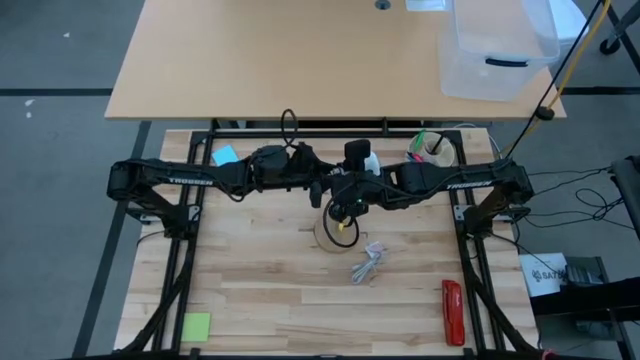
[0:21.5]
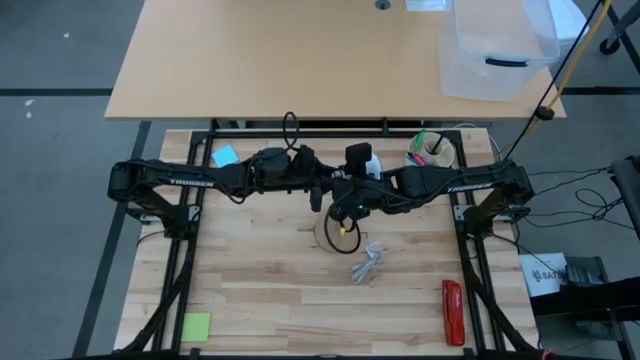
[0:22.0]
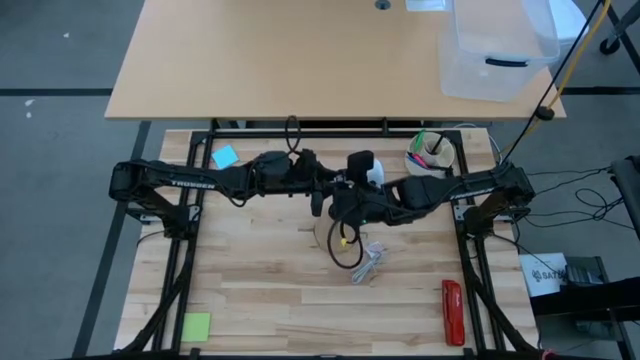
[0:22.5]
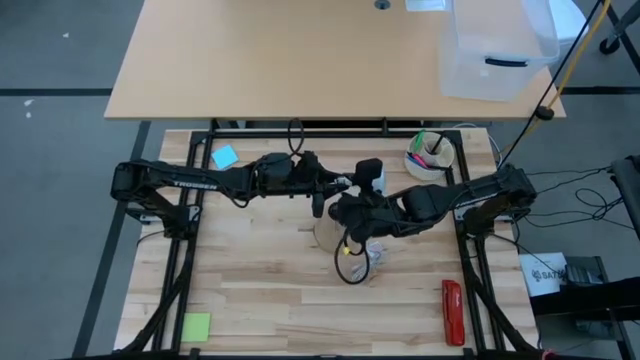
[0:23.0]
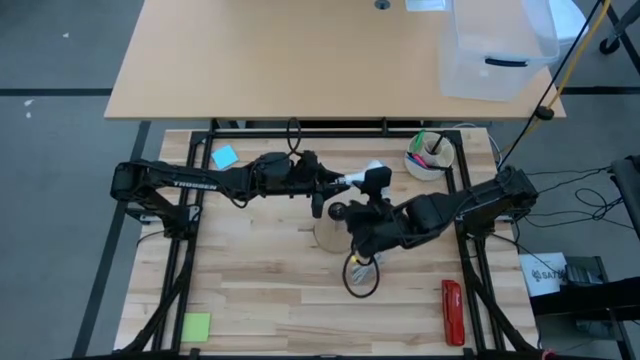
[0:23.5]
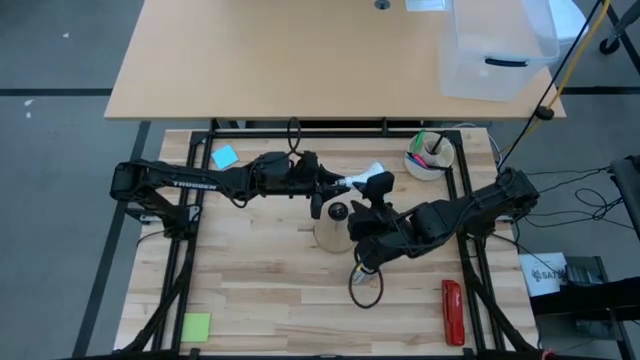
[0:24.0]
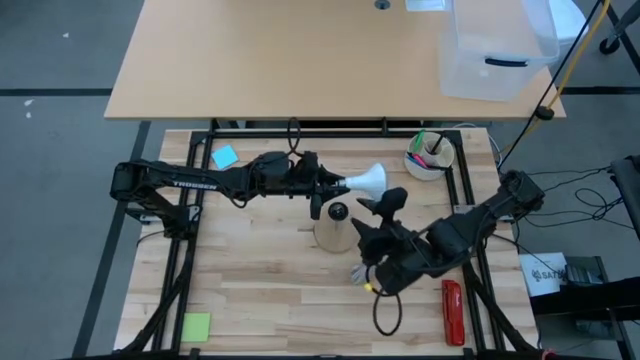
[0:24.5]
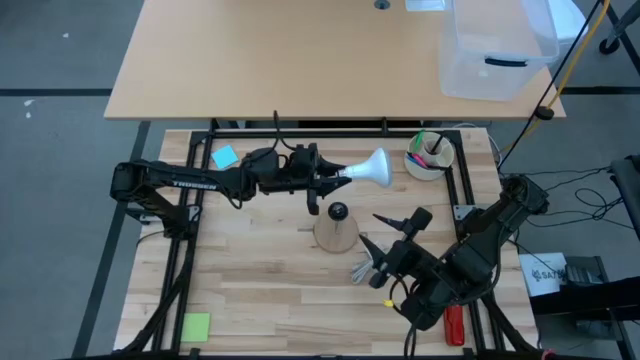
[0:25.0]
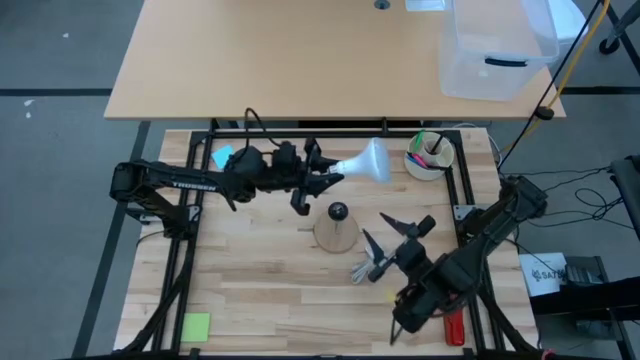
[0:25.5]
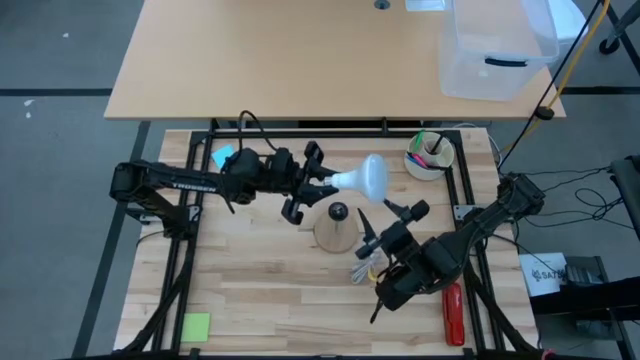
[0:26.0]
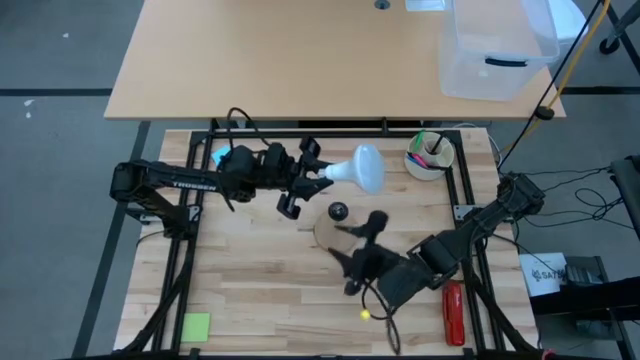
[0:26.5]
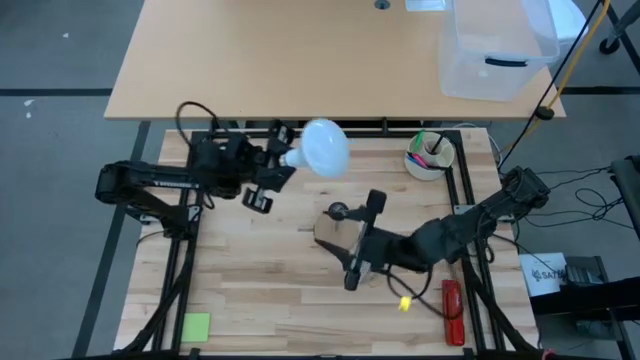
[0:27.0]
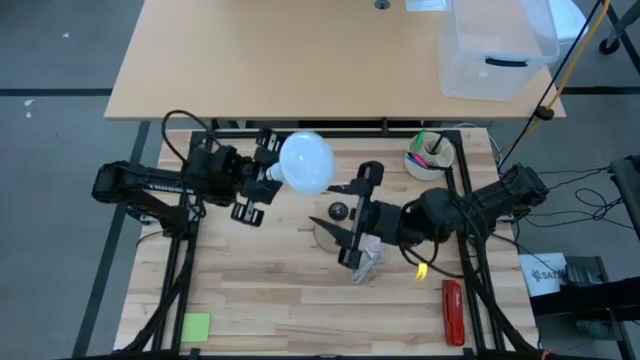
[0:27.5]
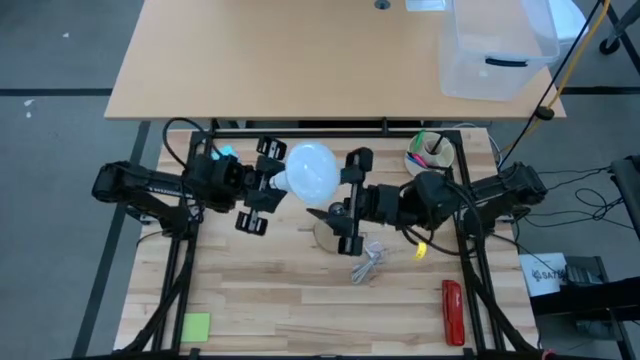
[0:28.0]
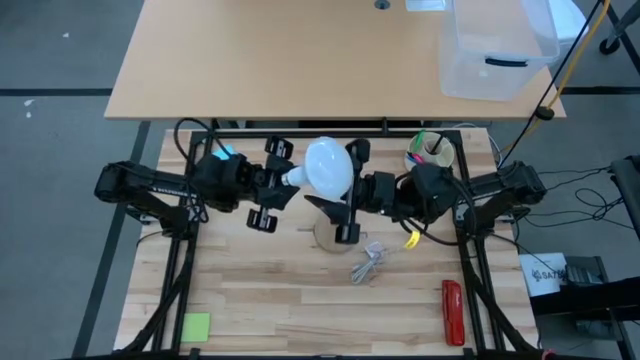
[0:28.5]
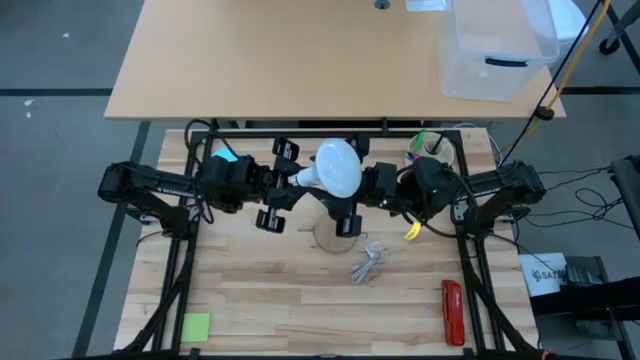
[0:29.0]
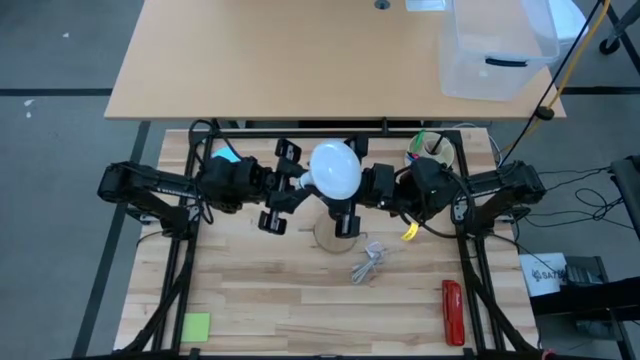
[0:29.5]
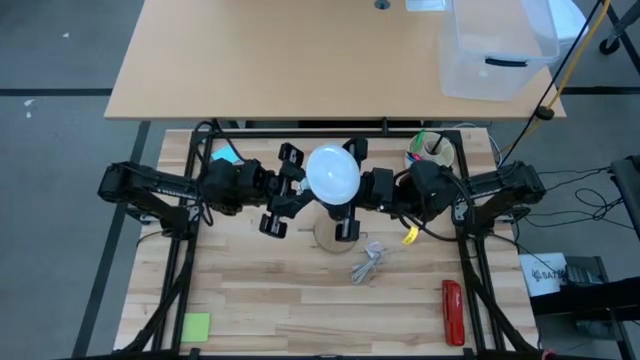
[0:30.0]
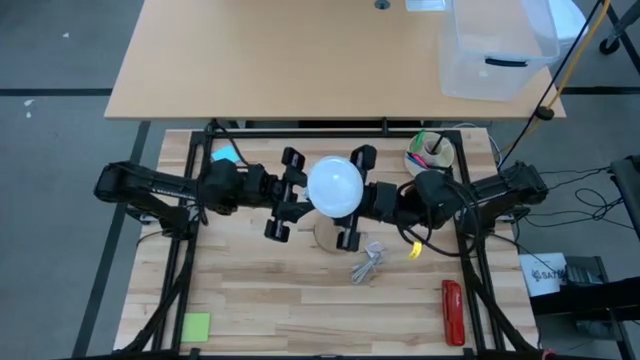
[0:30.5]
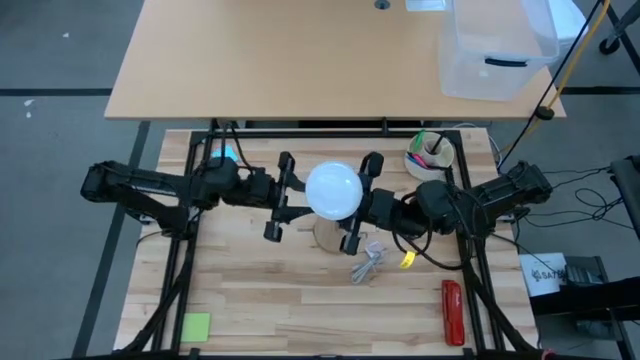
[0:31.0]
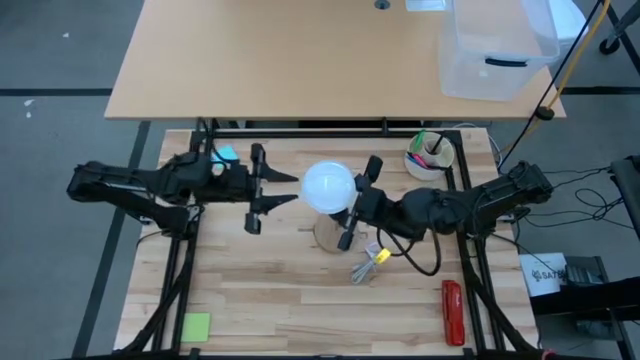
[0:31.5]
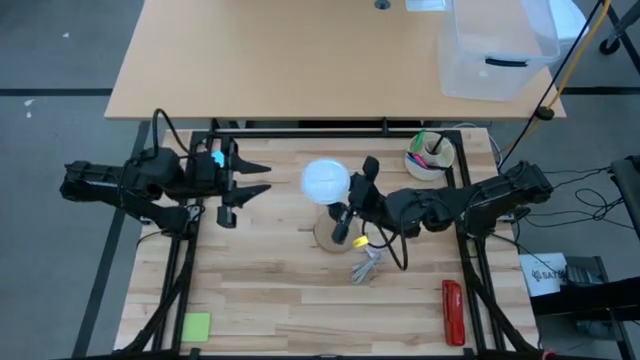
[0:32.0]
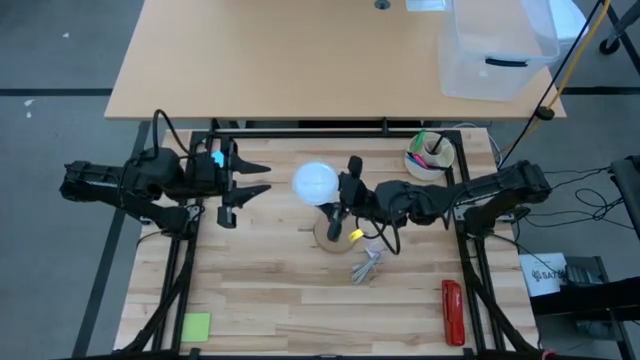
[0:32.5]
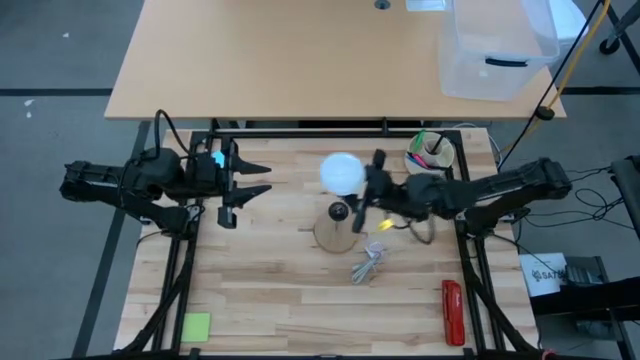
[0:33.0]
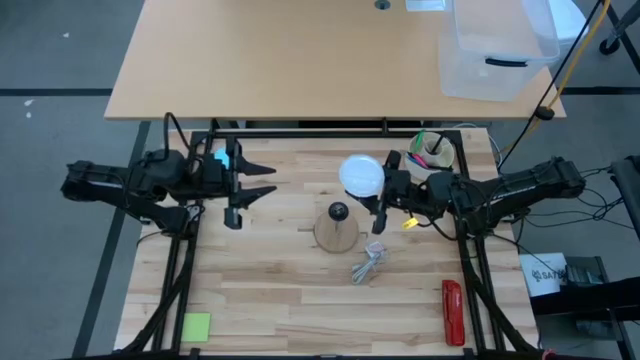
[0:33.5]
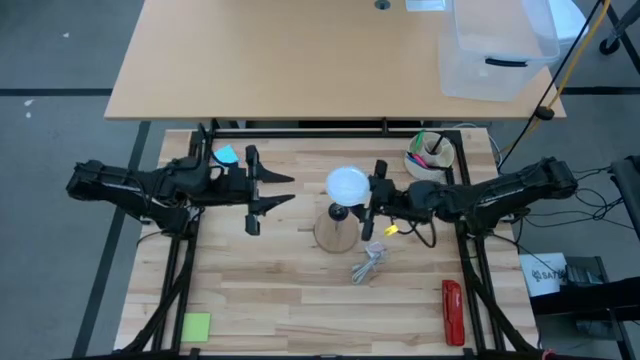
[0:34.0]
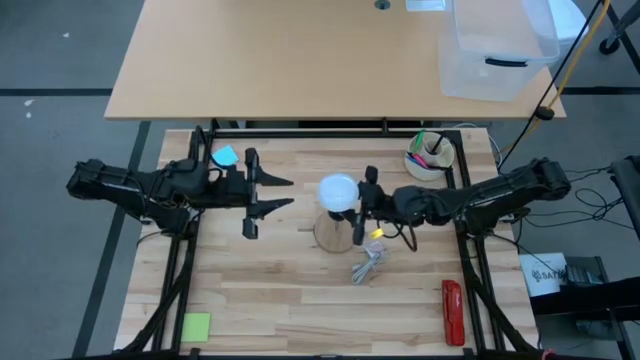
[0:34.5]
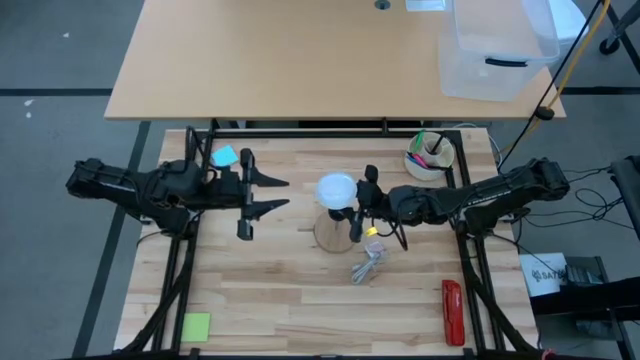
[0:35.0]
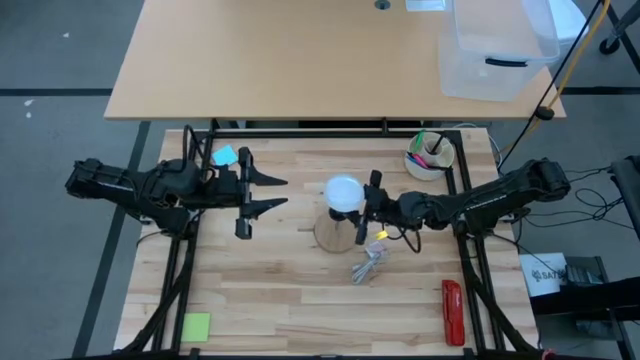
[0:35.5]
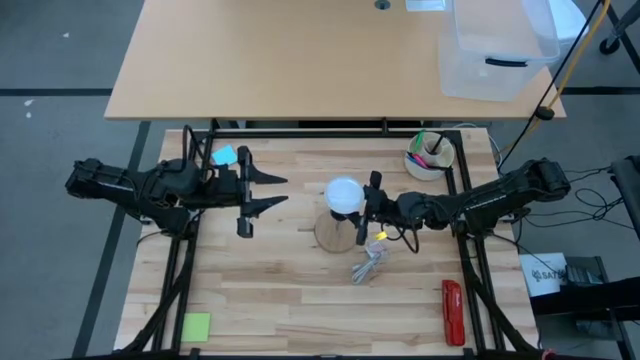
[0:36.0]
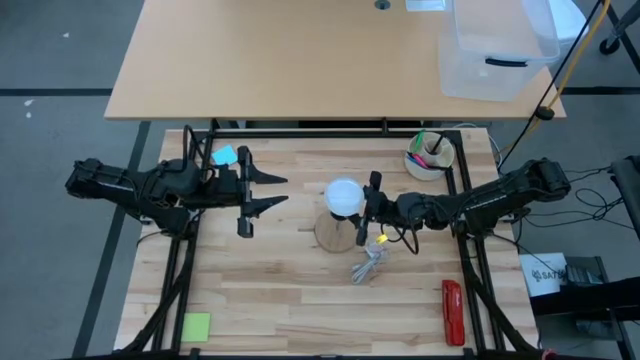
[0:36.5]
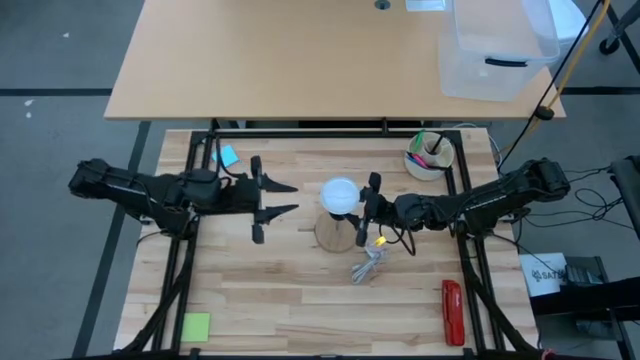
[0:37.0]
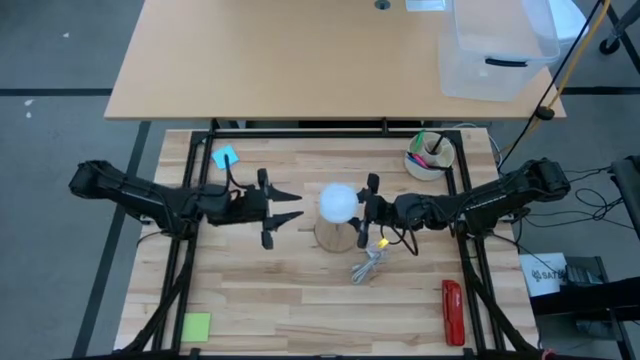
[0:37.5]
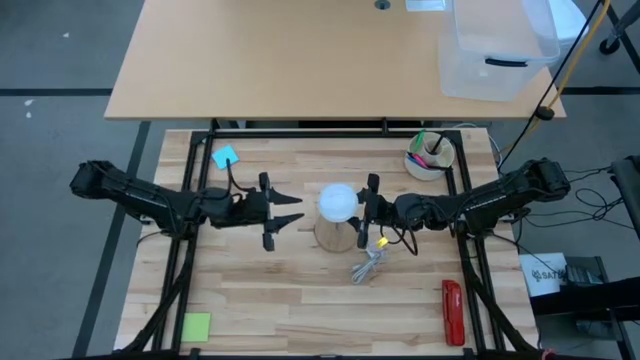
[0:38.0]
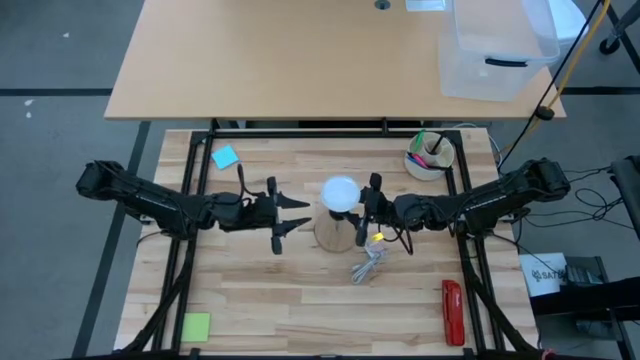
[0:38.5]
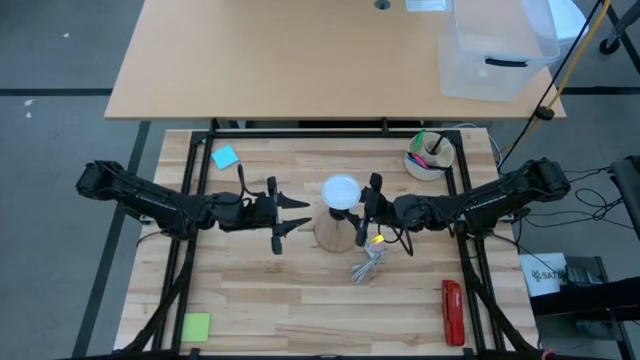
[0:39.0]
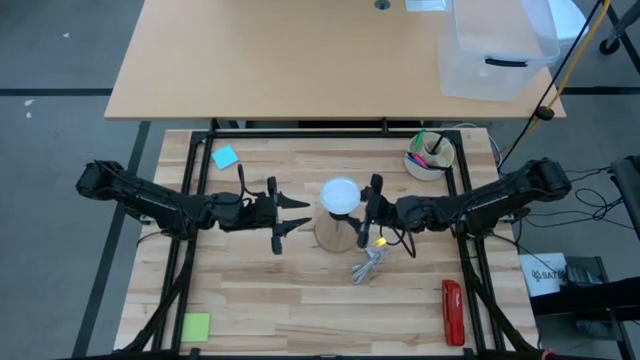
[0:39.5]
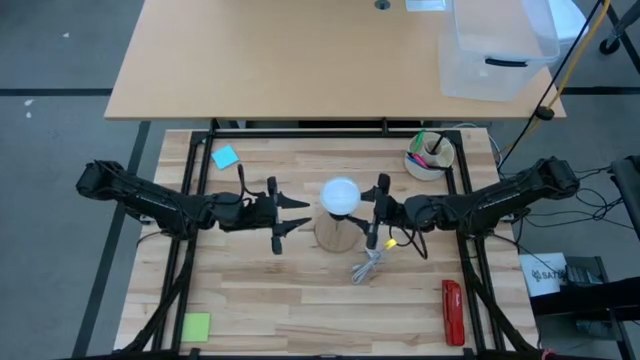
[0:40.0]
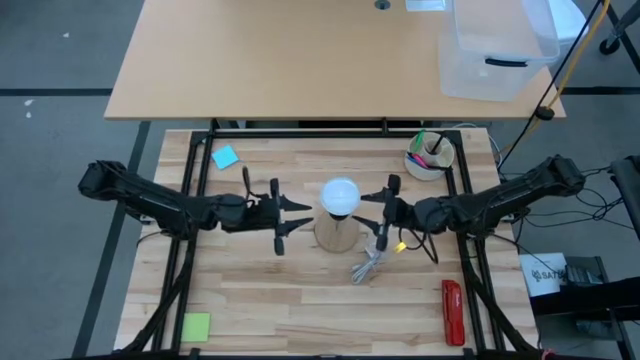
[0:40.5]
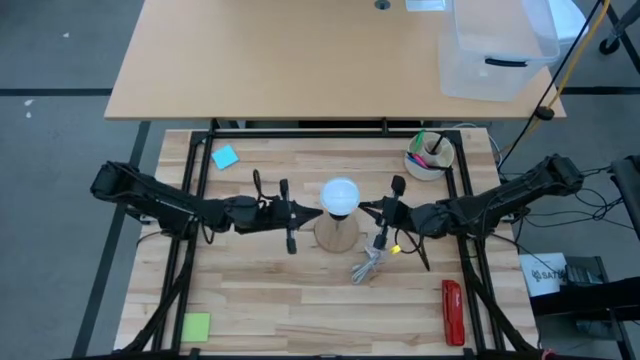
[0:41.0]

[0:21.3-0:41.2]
Task: Screw lightbulb
Insert the lightbulb into the lamp
